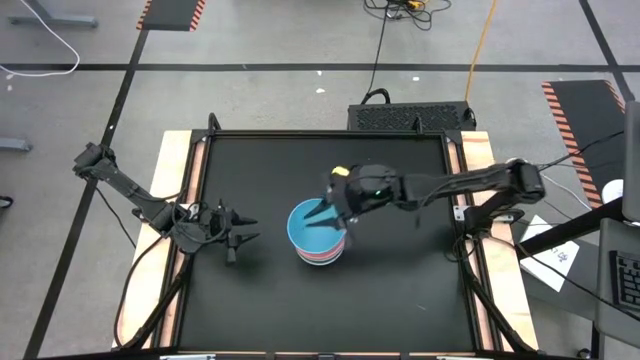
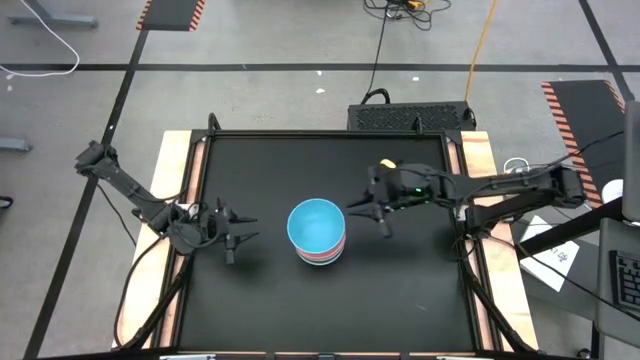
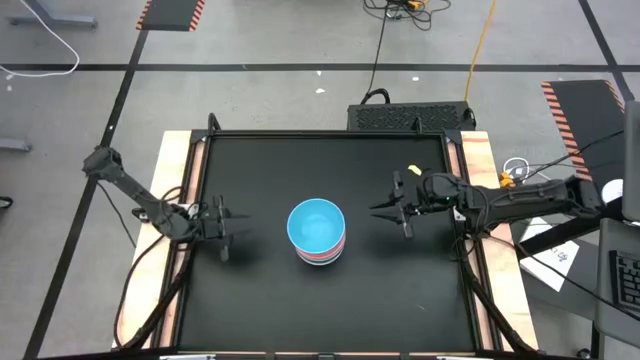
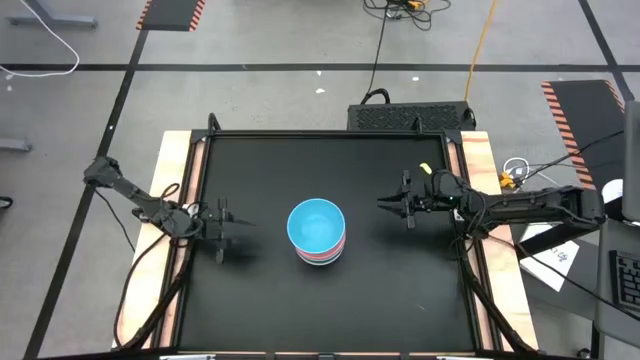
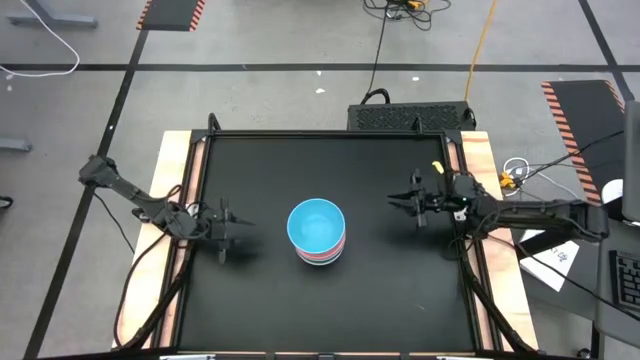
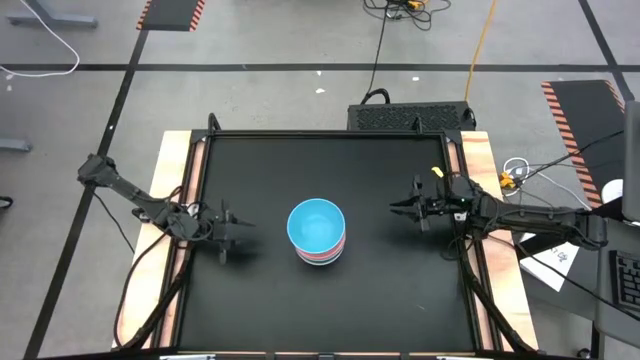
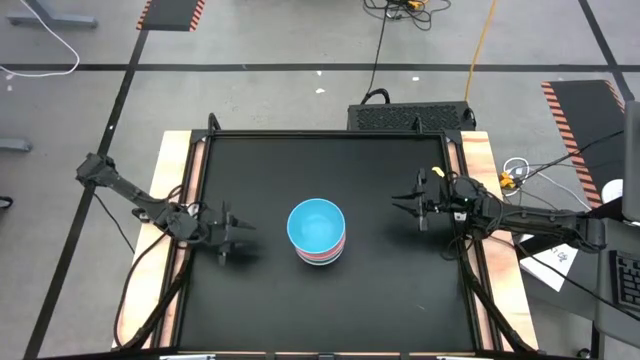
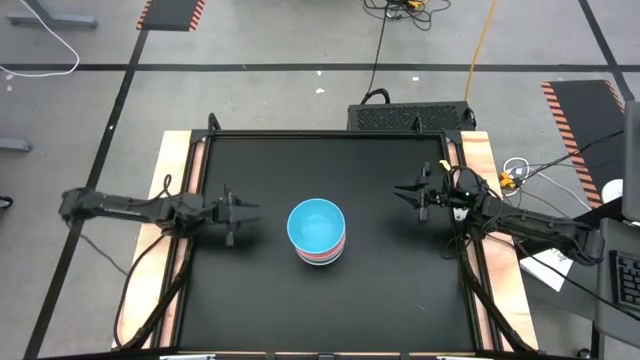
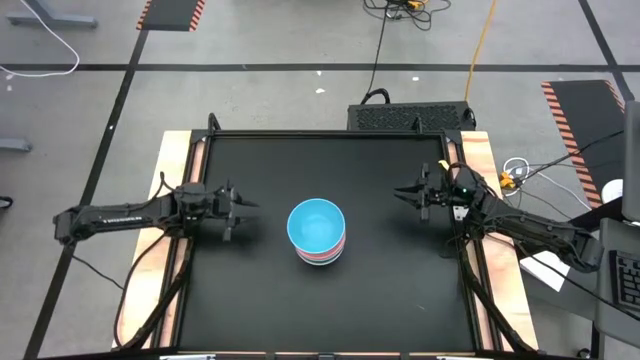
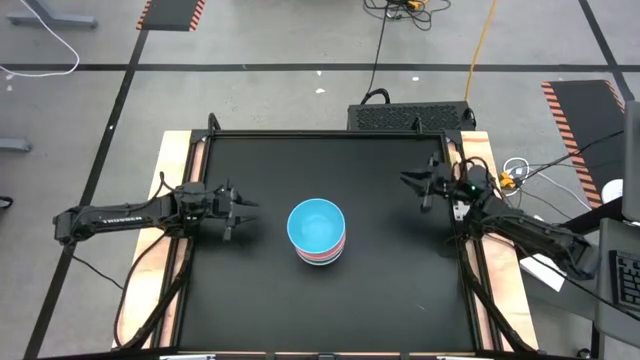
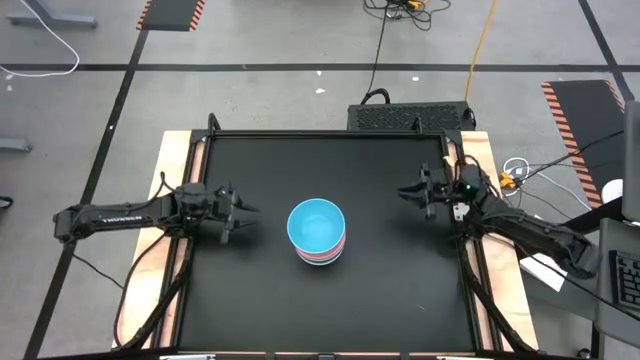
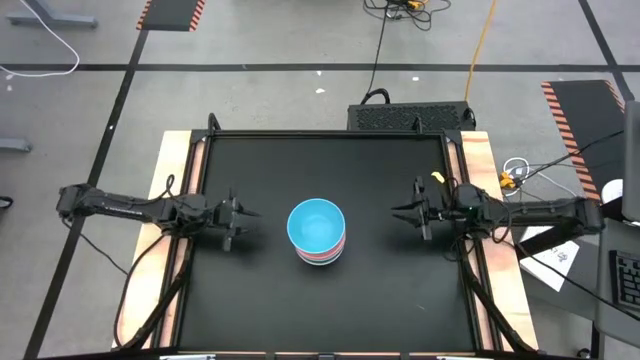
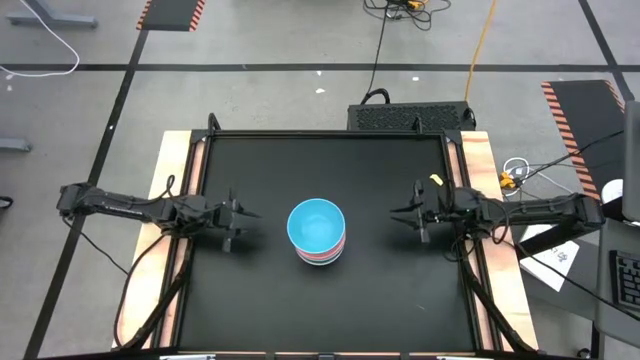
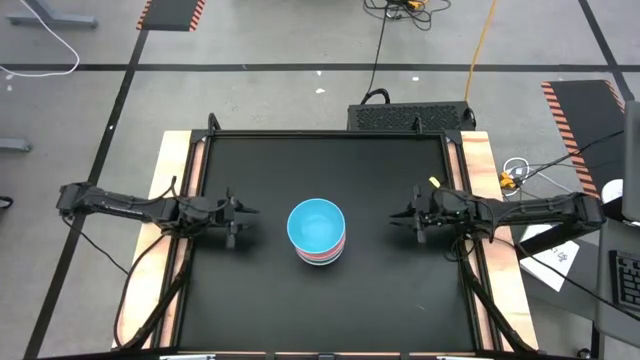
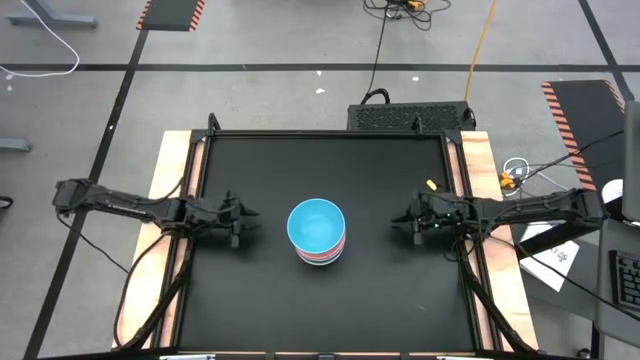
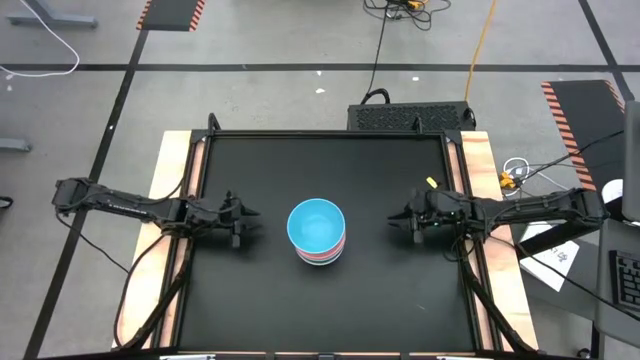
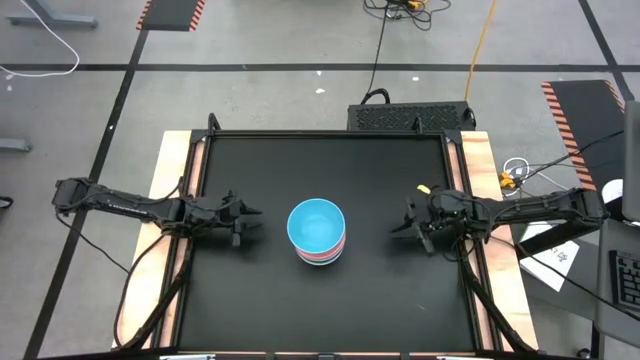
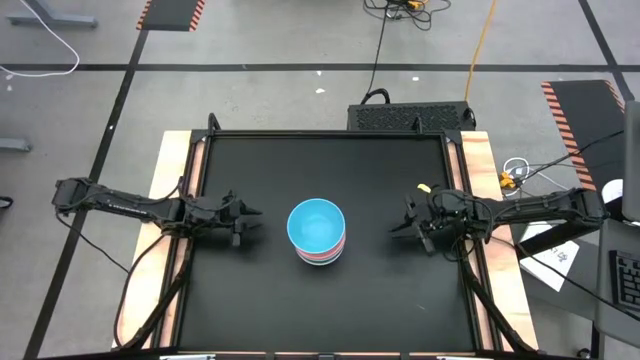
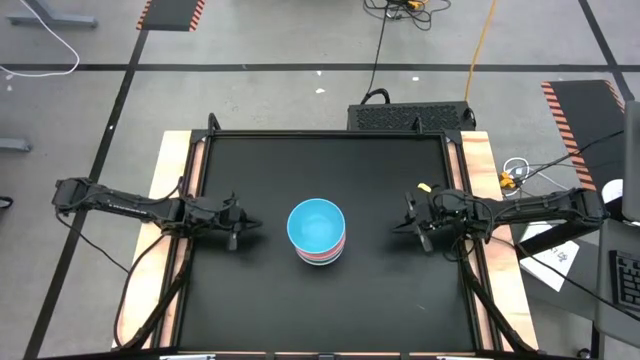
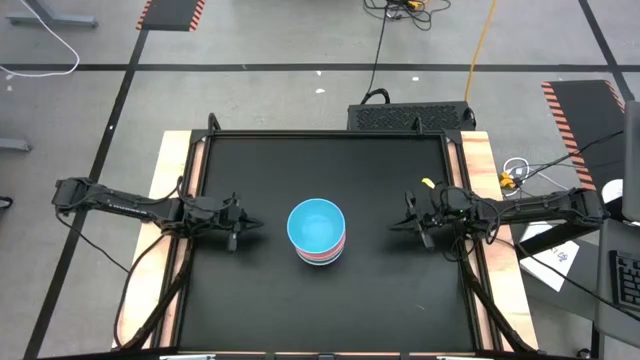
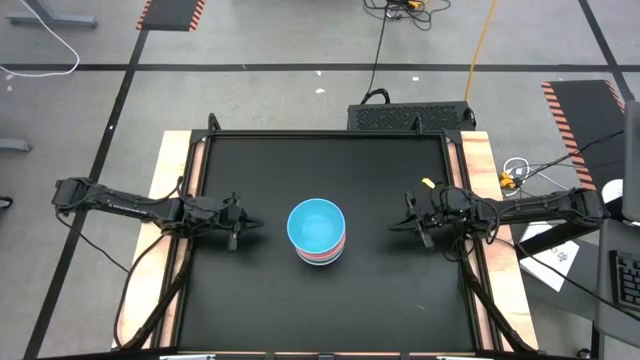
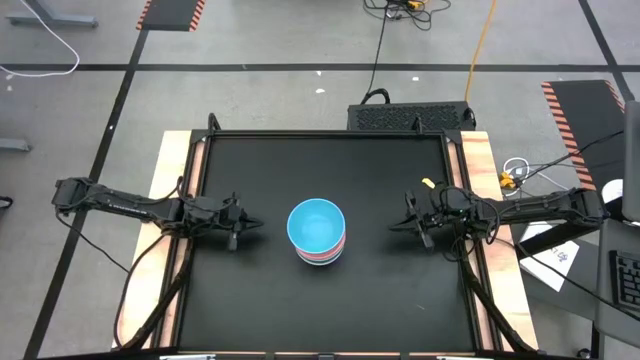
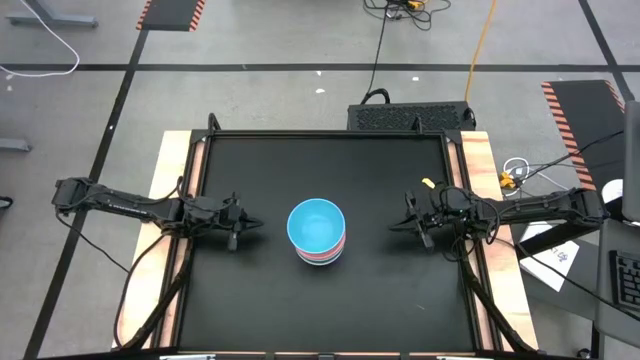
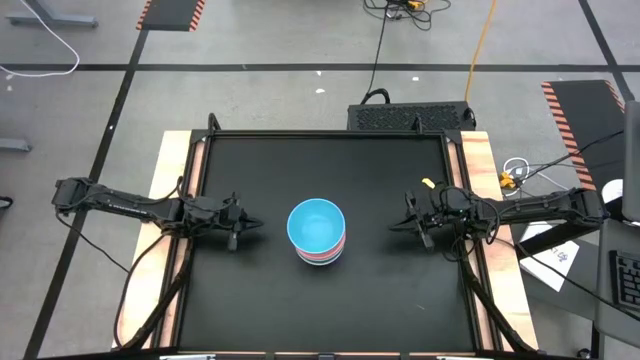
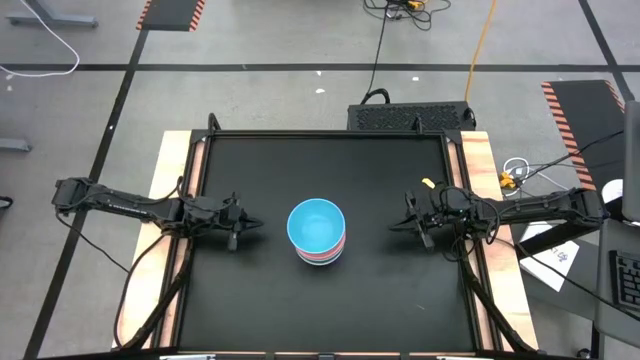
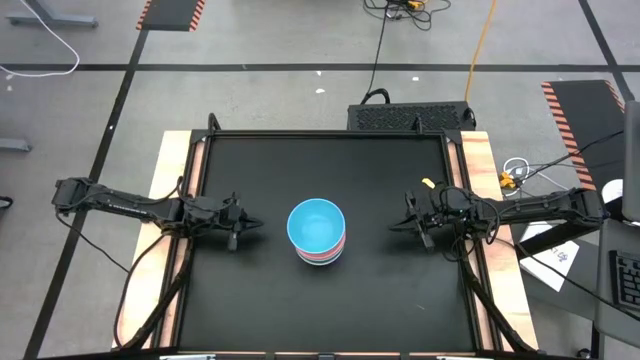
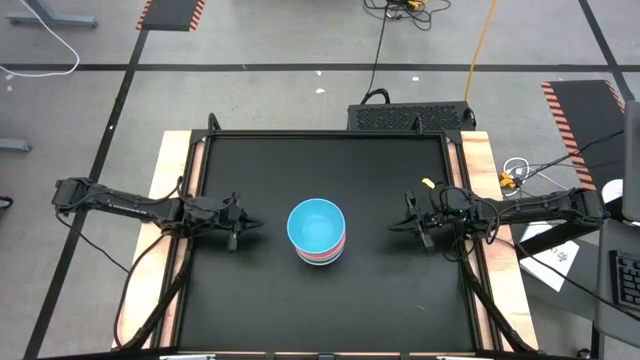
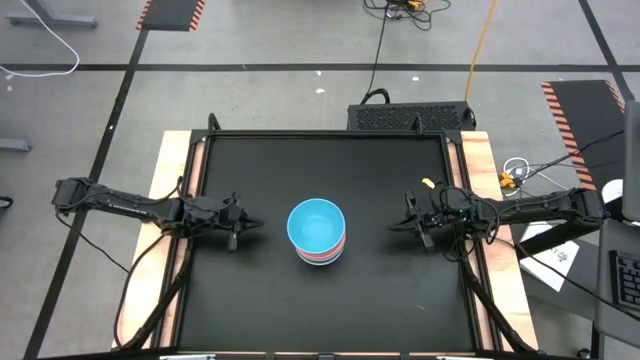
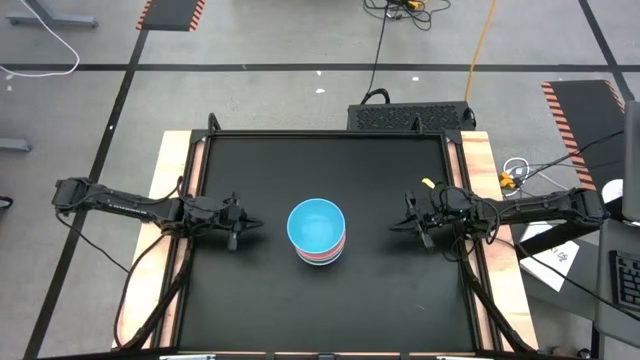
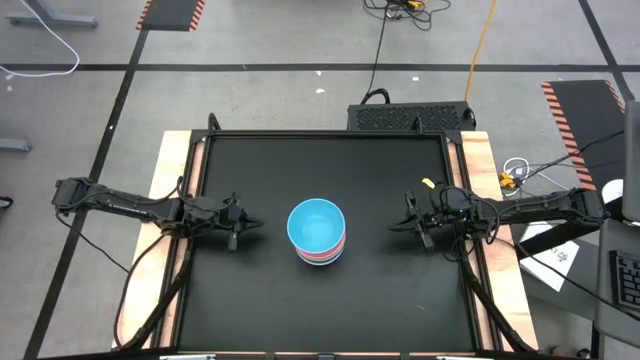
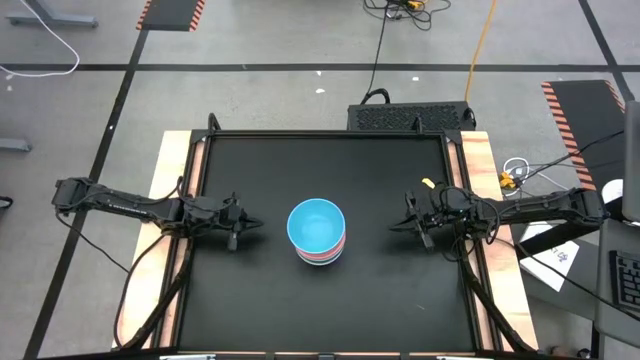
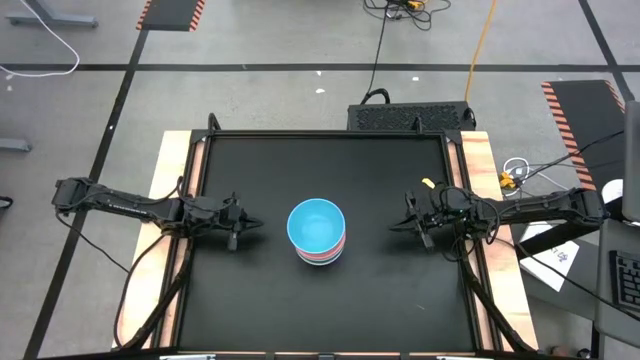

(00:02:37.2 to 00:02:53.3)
Task: Nest bowls inside each other
Return to Home Position

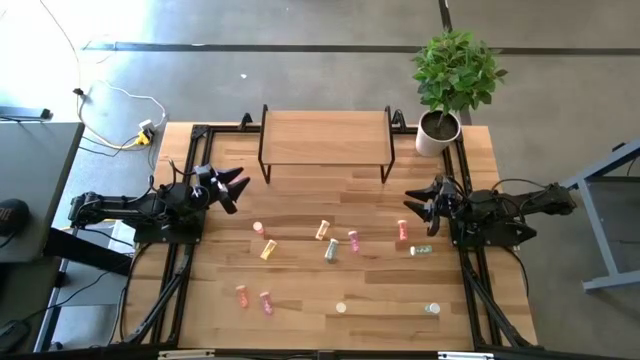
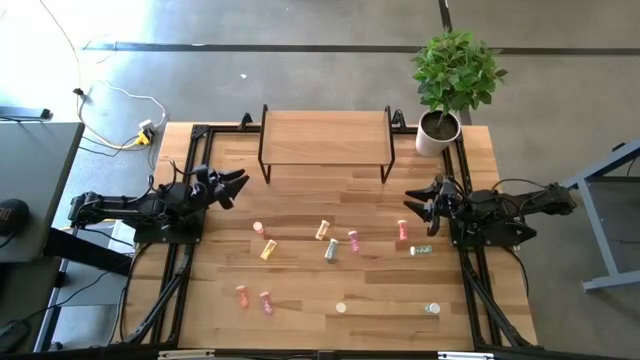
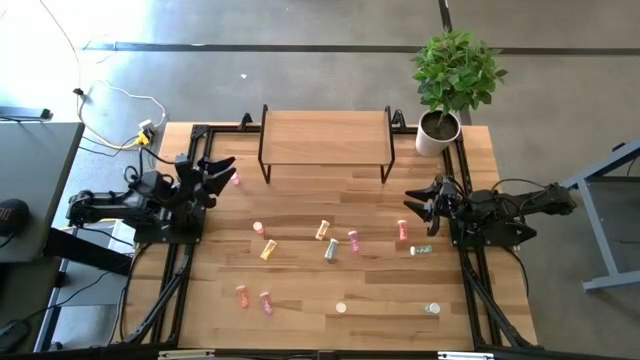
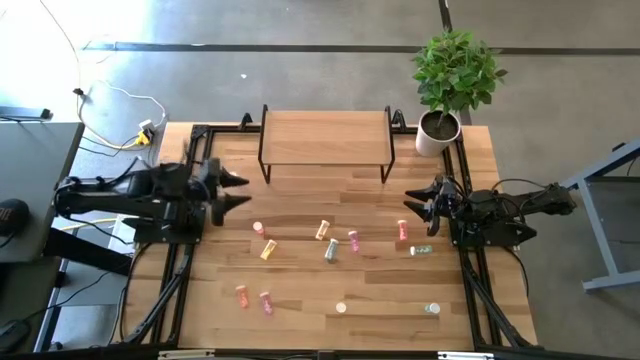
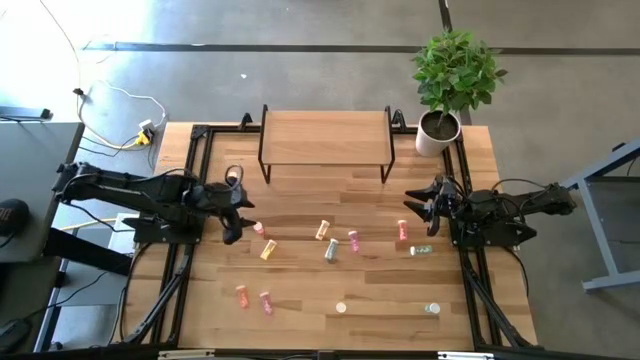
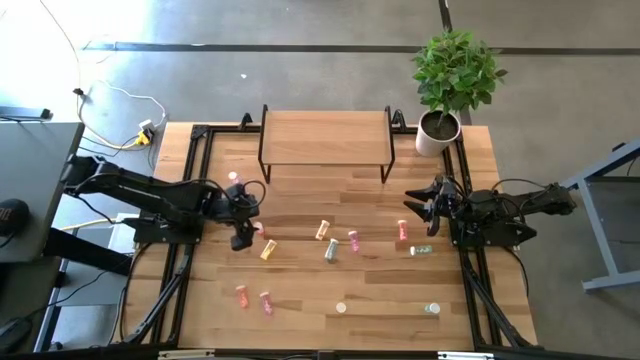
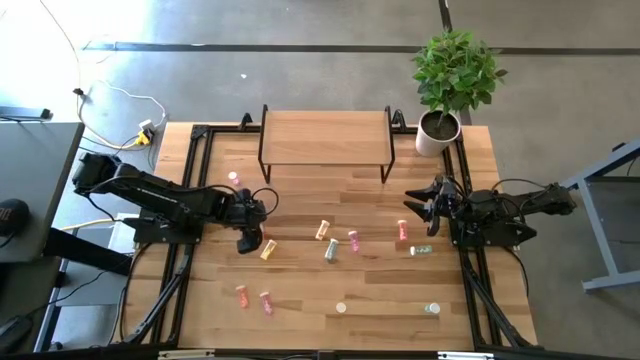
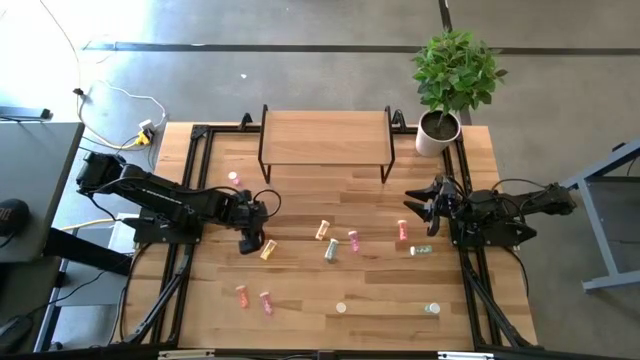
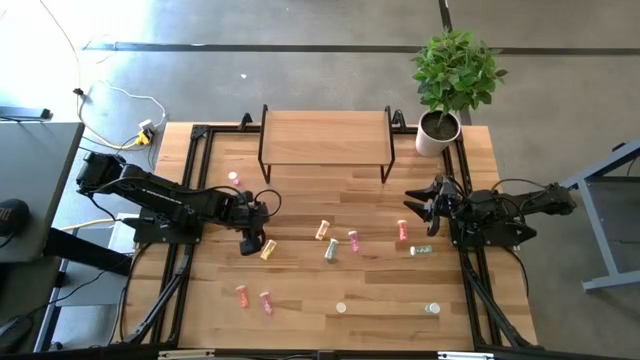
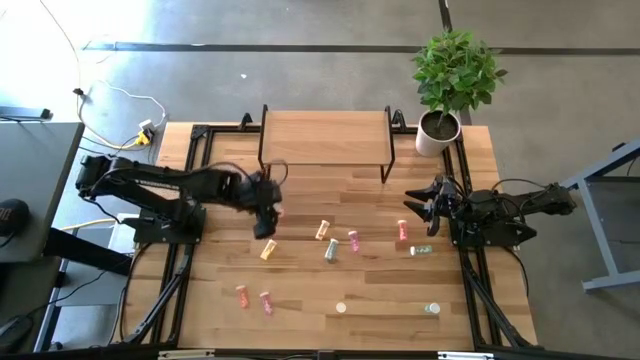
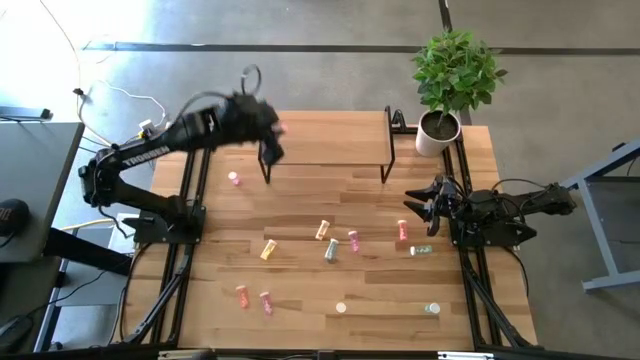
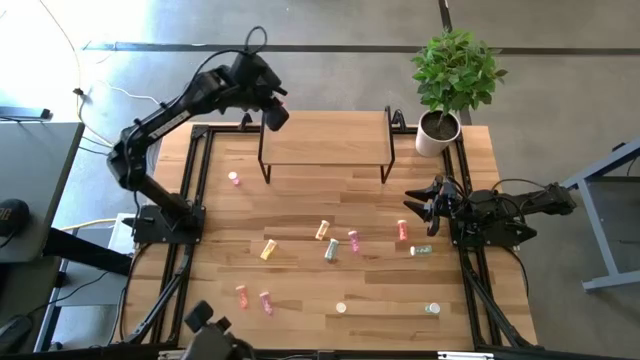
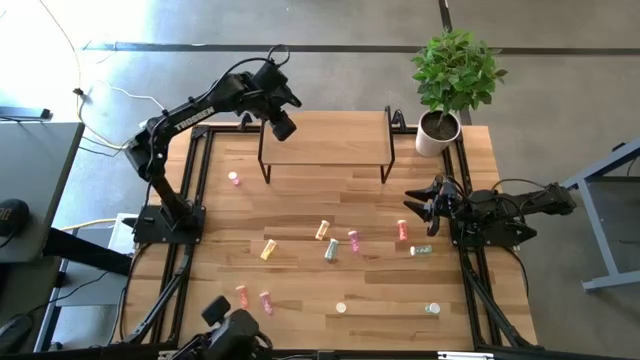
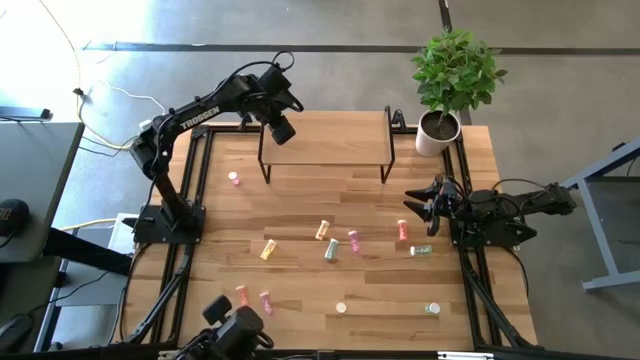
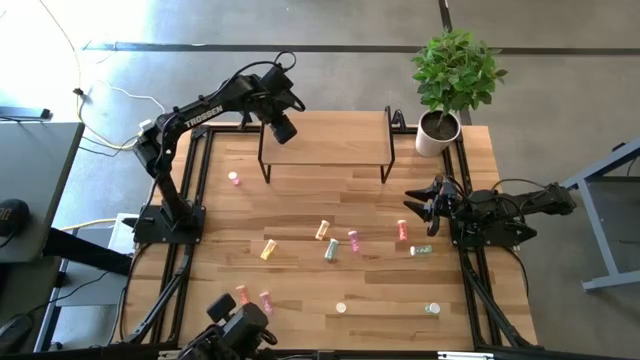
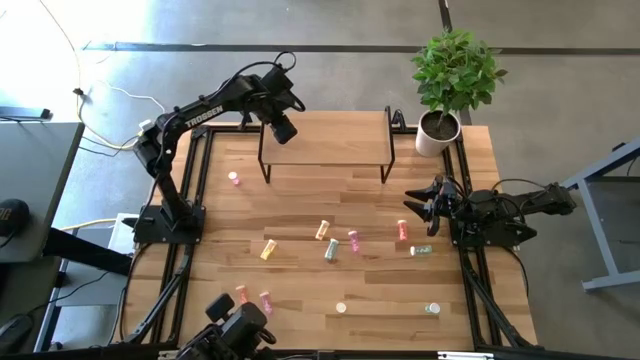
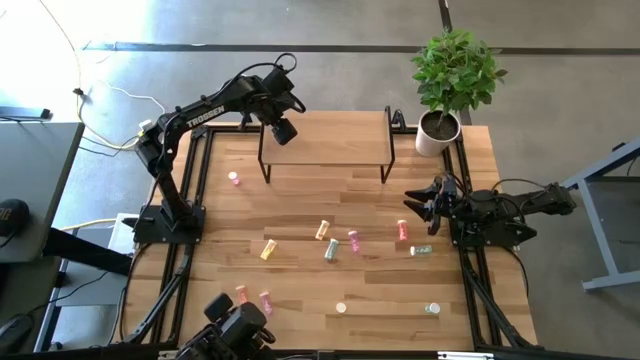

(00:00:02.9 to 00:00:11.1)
Task: Pick and place medicine bottles onto shelf by color
Put the top left pink pill bottle on the shelf
